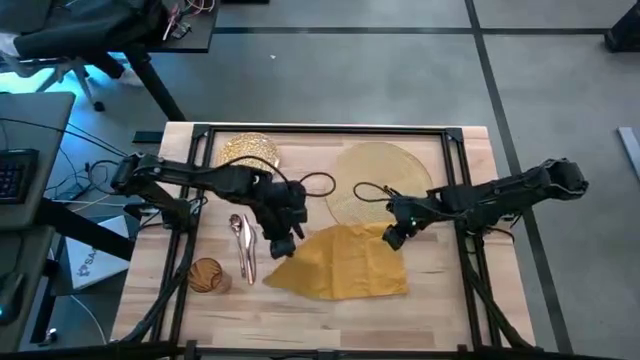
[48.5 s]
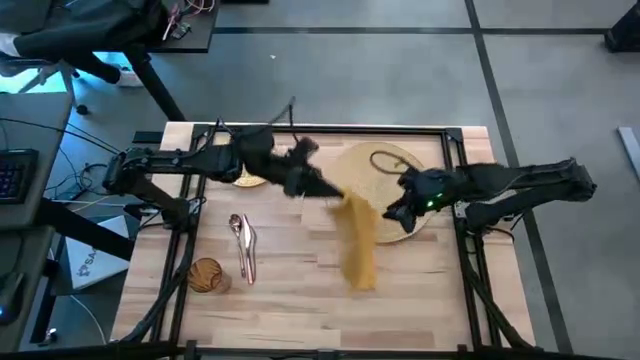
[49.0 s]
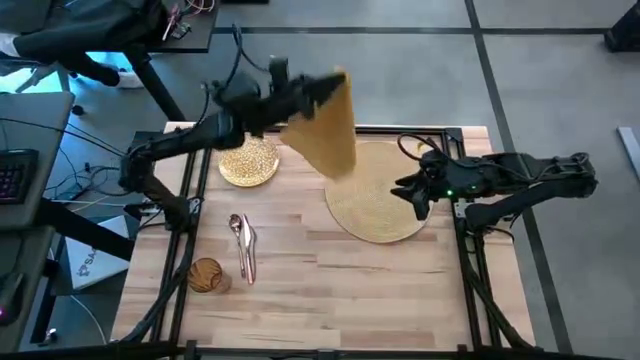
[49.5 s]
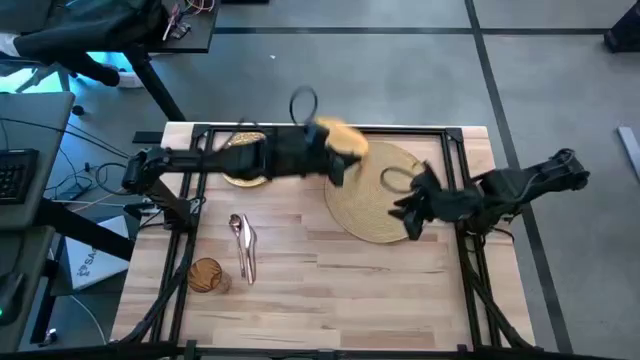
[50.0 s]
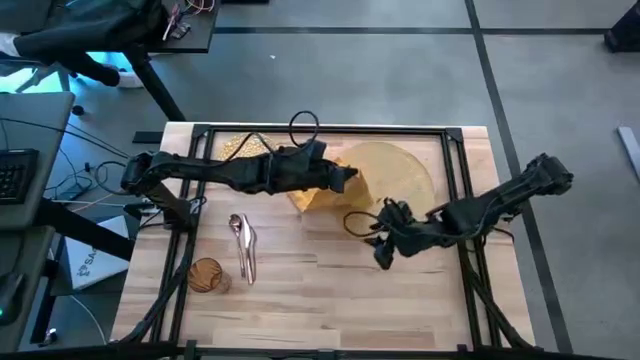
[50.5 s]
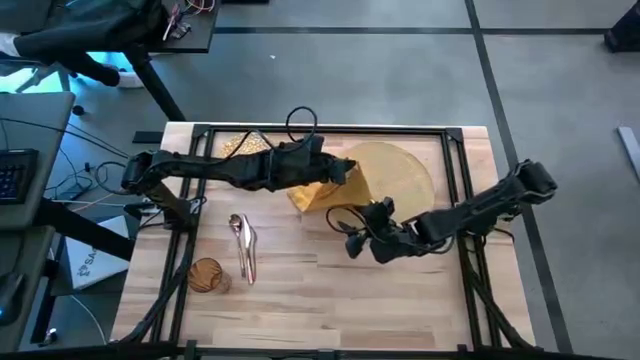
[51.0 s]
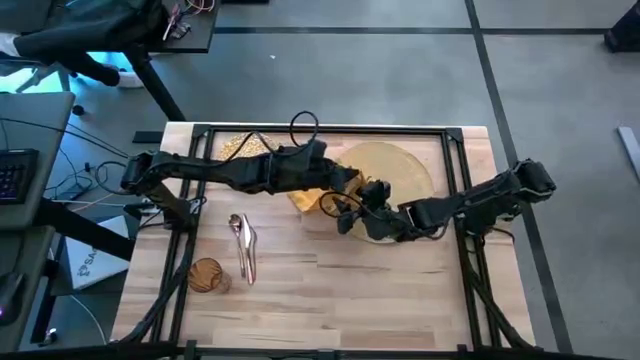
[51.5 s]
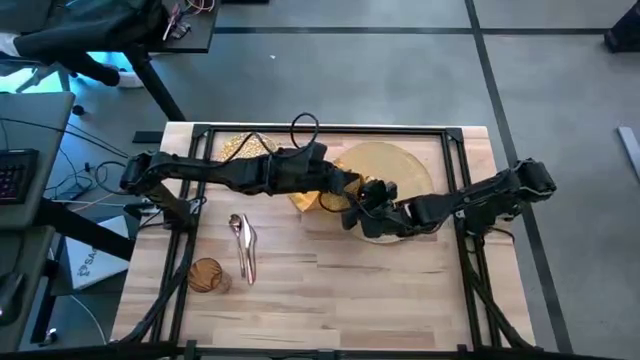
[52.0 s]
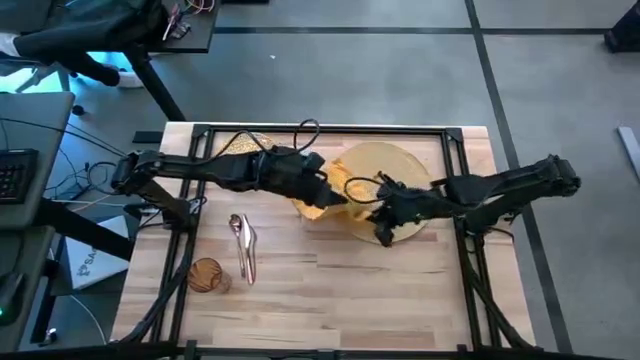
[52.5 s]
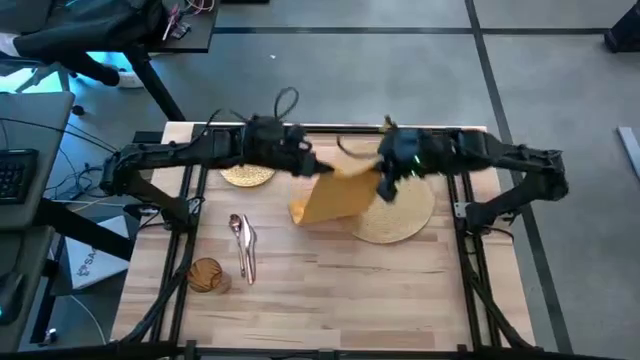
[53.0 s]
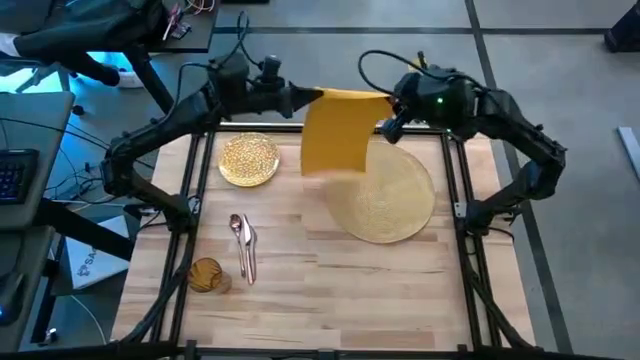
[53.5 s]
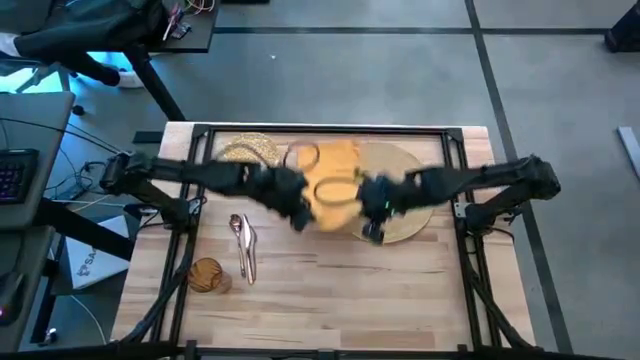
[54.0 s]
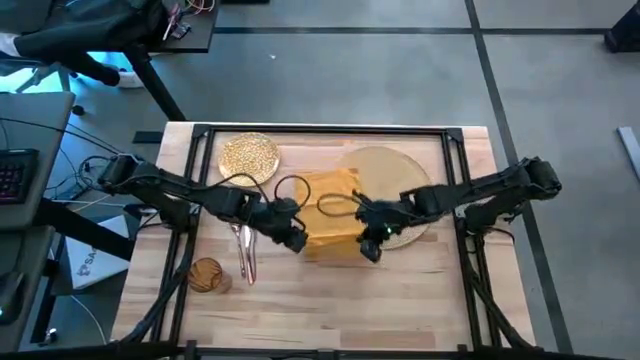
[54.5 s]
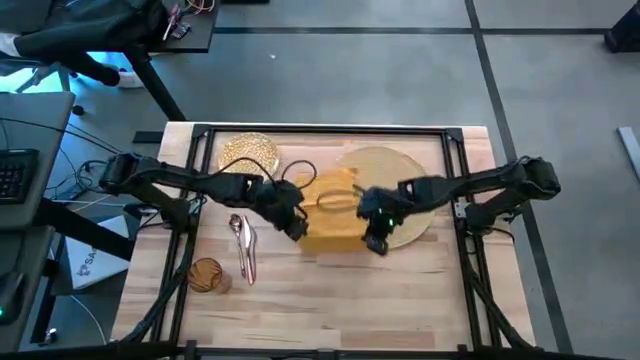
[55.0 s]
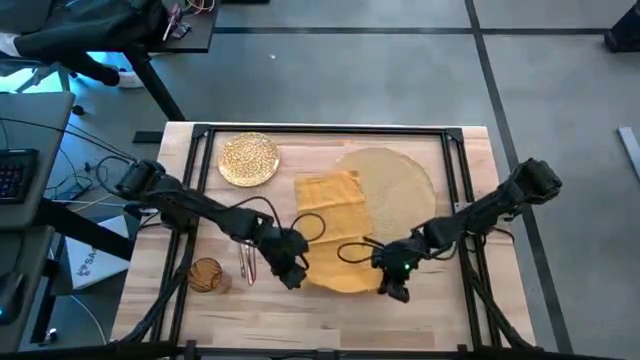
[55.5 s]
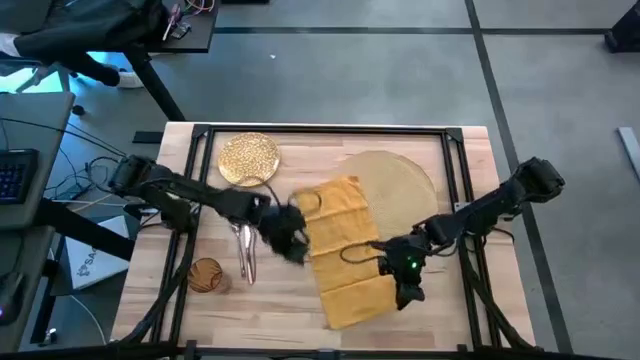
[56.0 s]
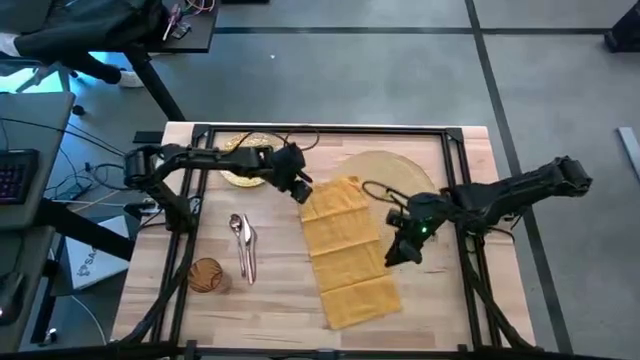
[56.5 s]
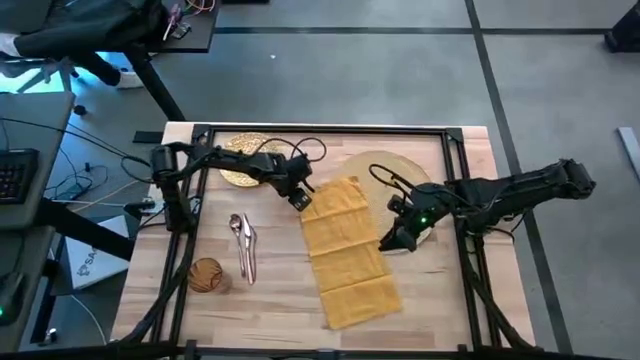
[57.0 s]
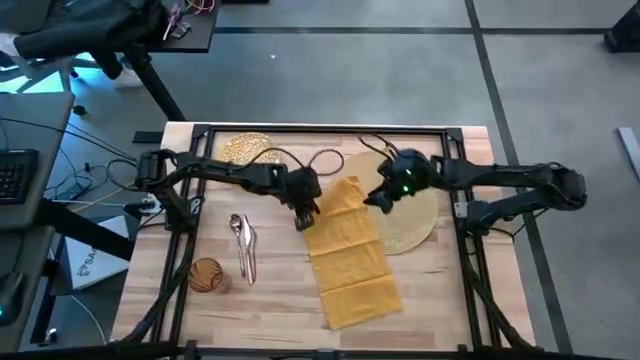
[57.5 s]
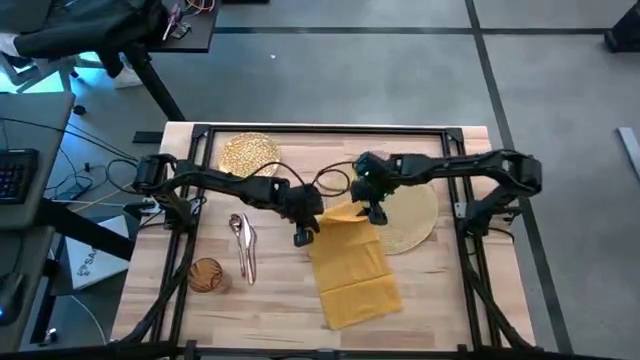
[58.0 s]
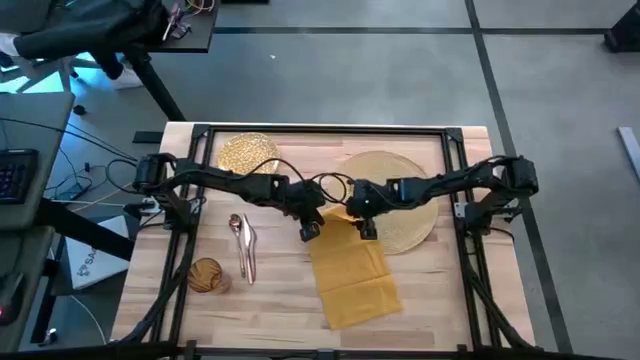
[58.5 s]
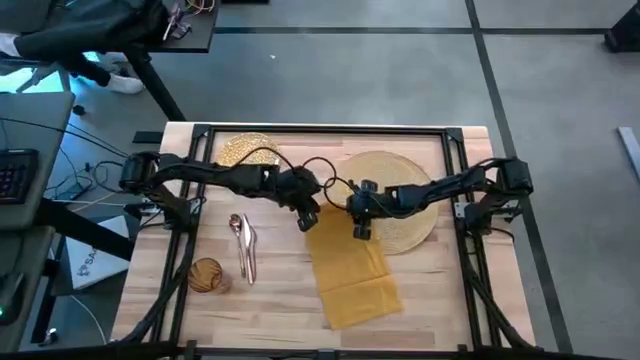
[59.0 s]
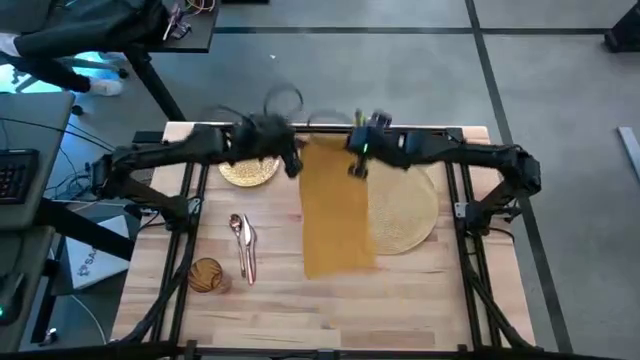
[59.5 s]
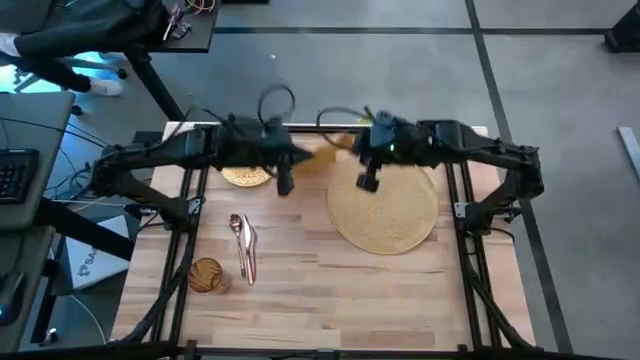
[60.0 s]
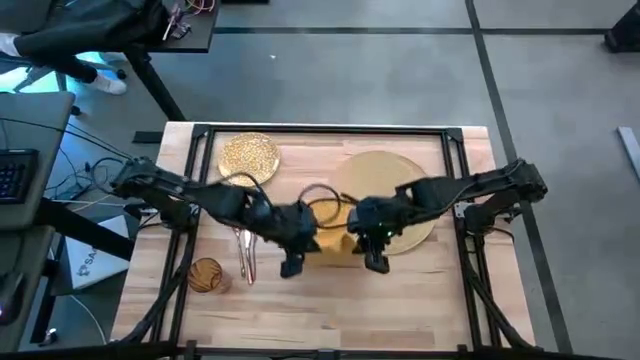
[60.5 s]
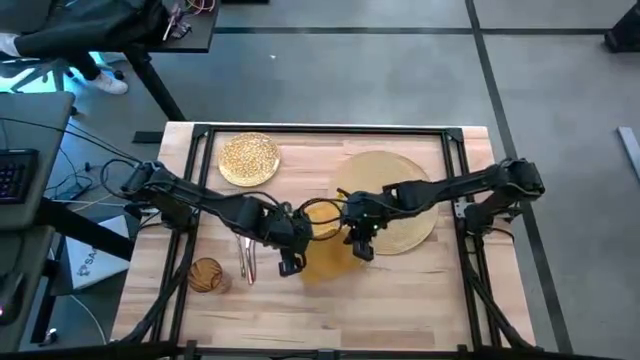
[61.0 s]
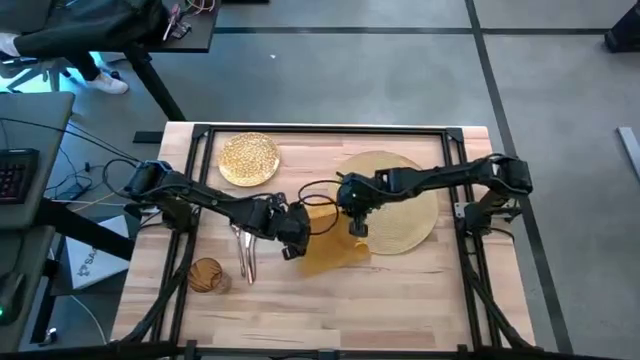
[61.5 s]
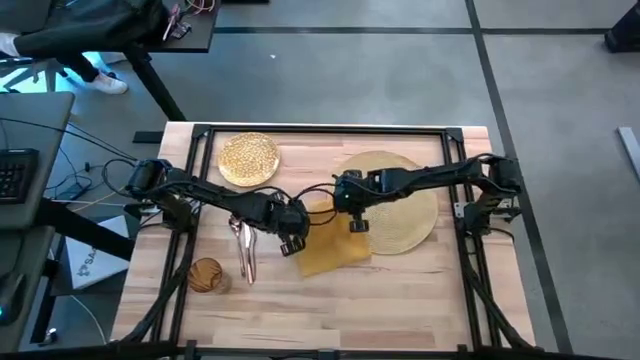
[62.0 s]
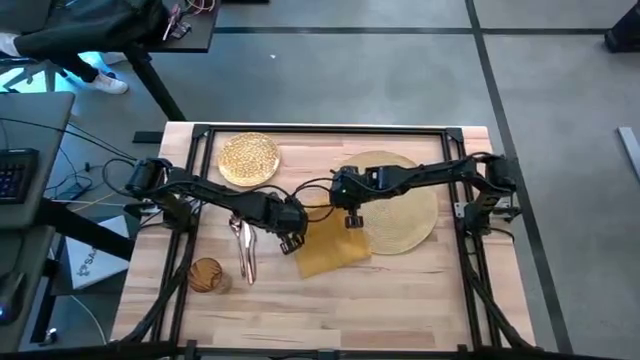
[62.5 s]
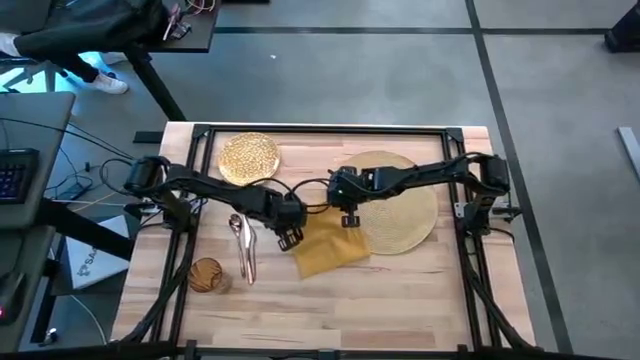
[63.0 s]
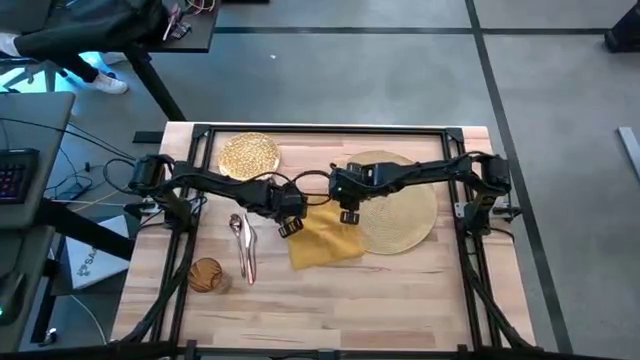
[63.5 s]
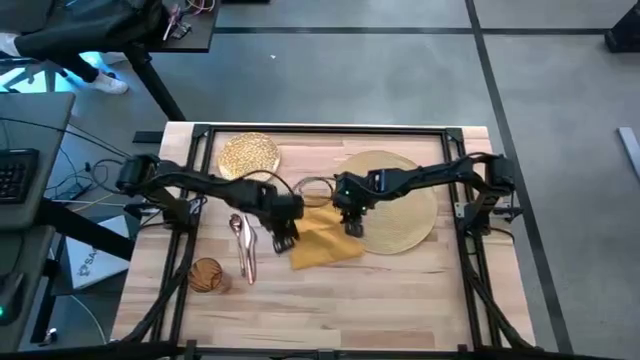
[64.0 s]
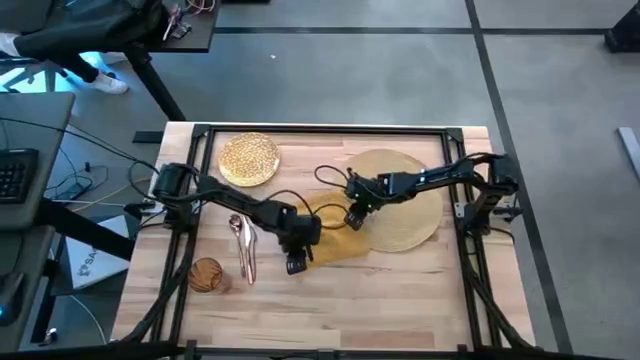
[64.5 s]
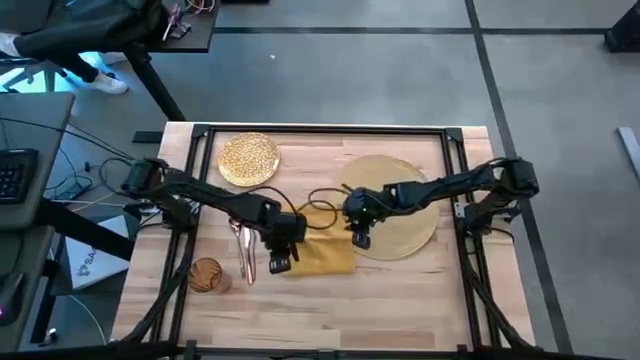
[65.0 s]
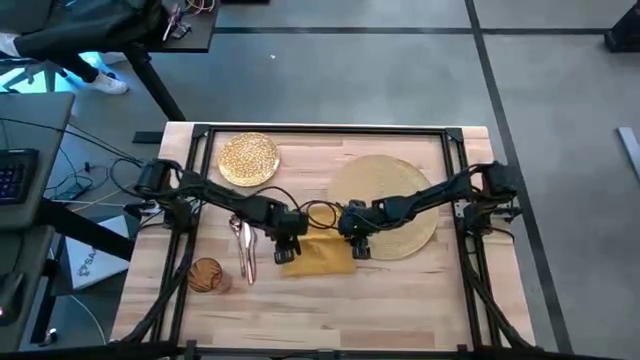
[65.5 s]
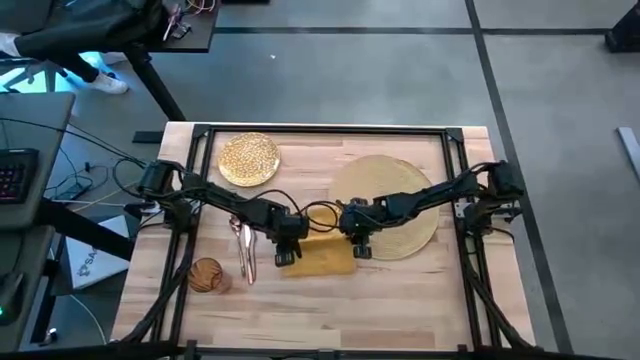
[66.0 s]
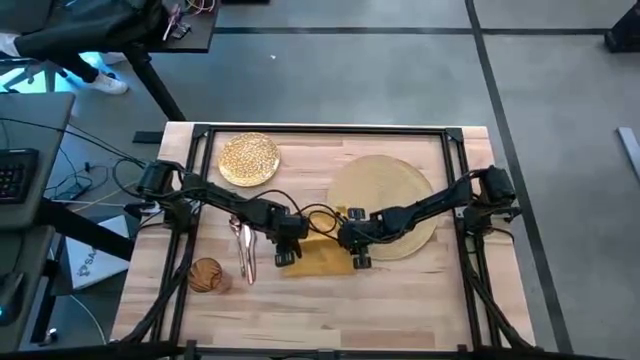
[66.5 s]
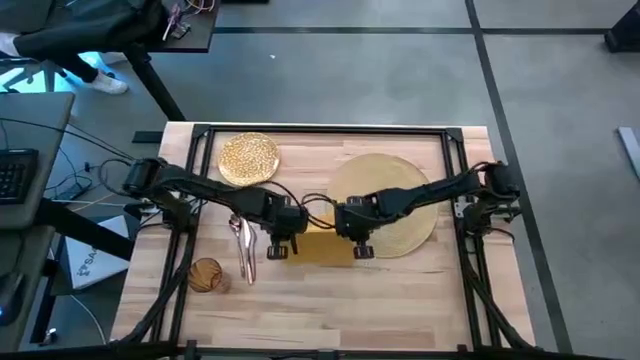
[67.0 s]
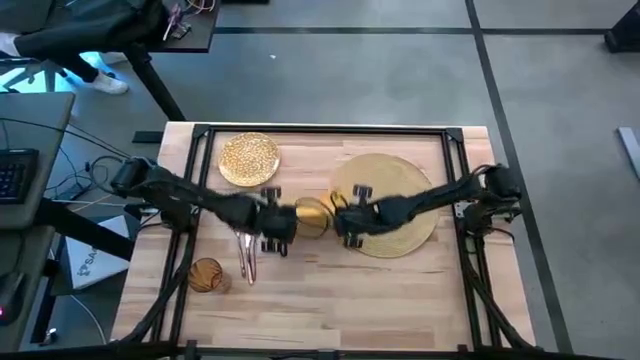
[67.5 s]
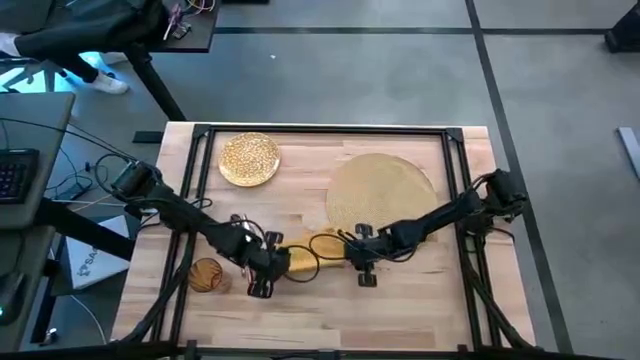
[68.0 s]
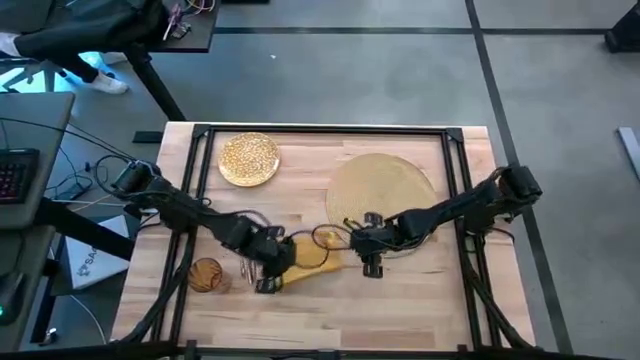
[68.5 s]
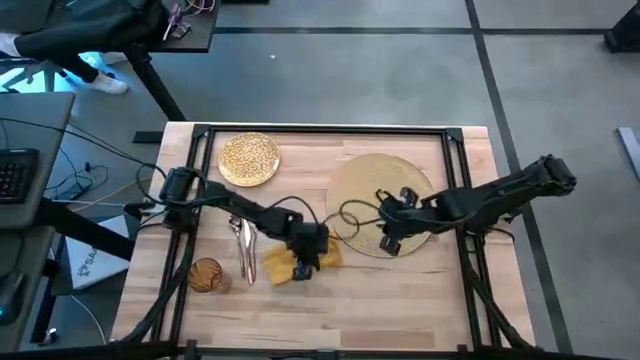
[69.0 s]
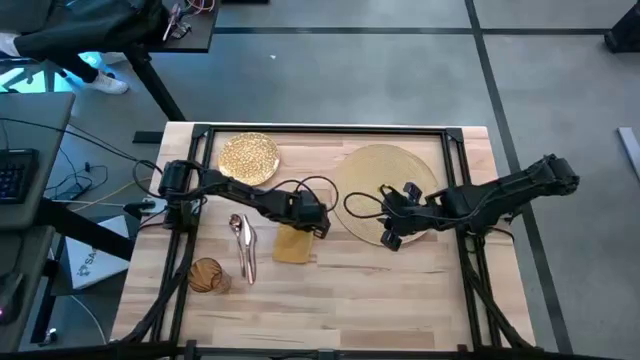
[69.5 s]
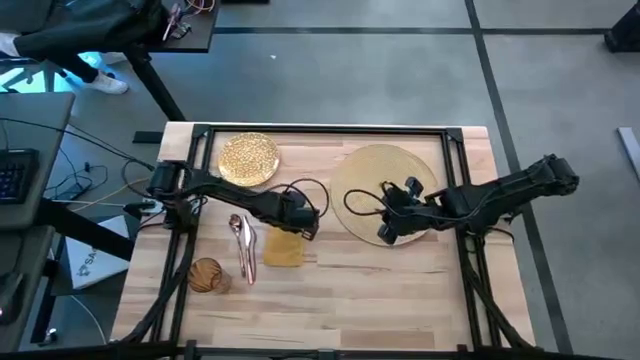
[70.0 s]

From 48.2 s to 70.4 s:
Task: Set table place
Fold the yellow table napkin on the table
